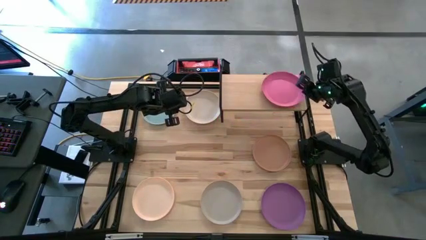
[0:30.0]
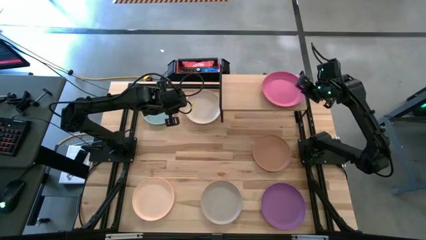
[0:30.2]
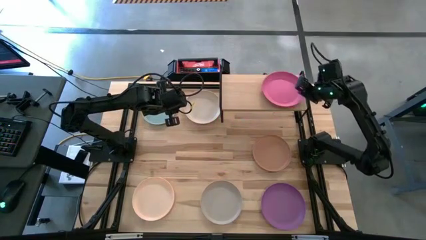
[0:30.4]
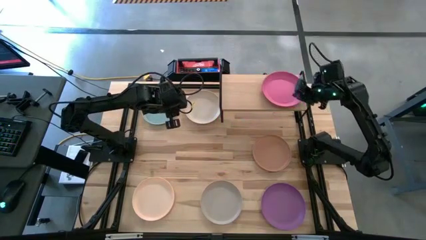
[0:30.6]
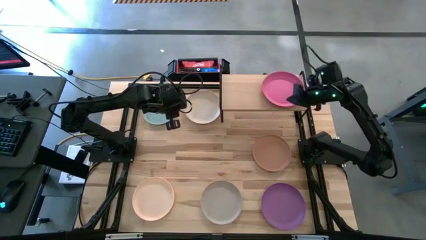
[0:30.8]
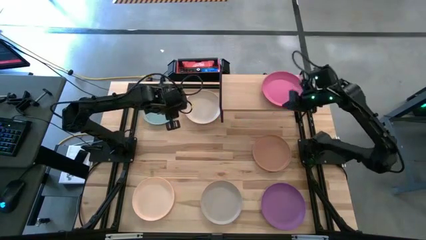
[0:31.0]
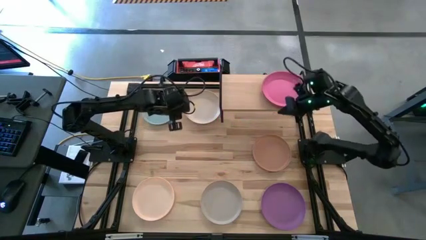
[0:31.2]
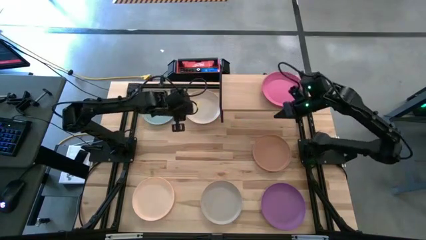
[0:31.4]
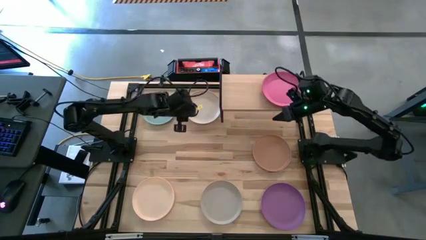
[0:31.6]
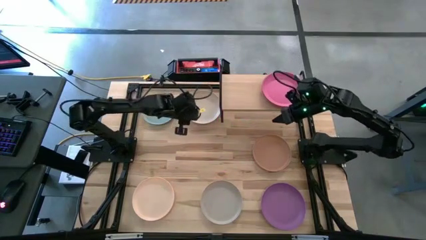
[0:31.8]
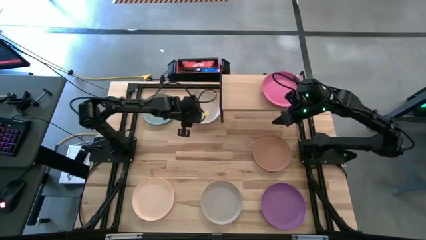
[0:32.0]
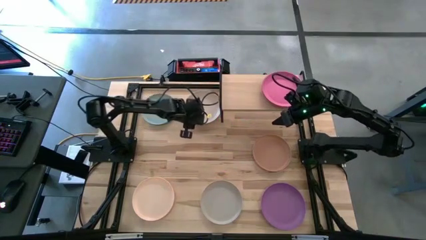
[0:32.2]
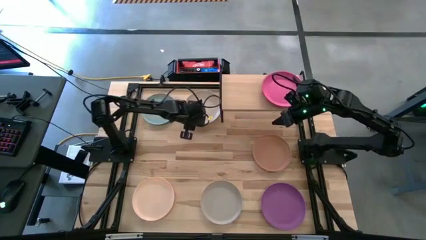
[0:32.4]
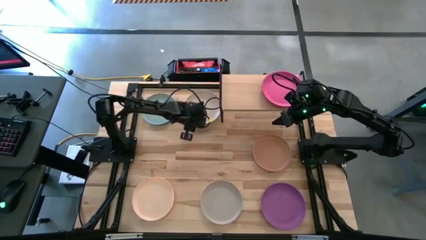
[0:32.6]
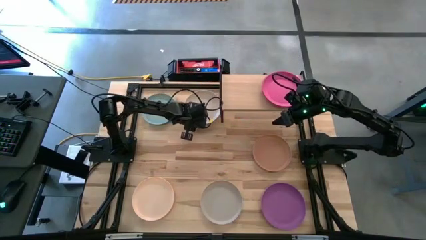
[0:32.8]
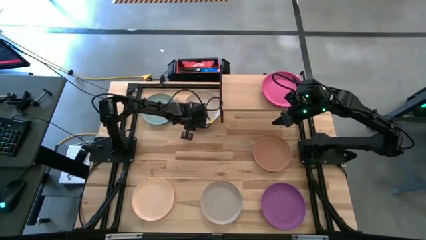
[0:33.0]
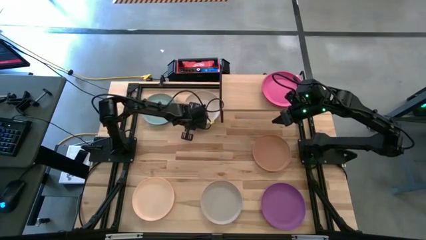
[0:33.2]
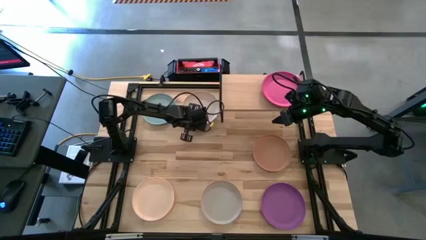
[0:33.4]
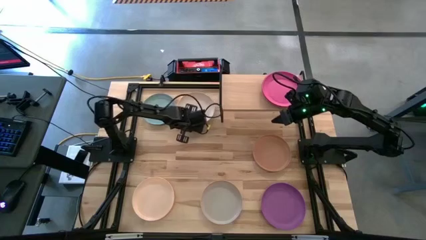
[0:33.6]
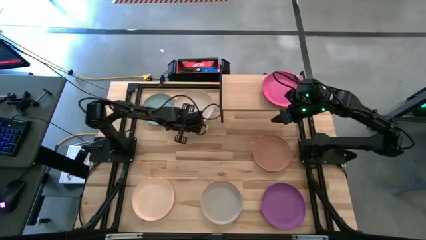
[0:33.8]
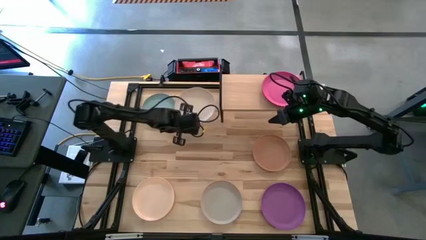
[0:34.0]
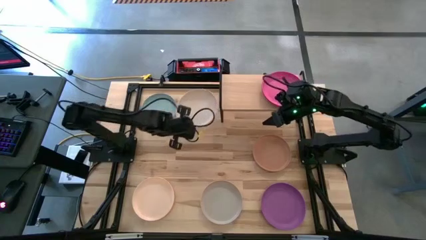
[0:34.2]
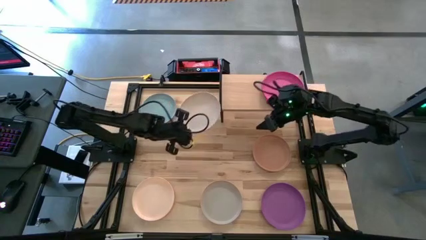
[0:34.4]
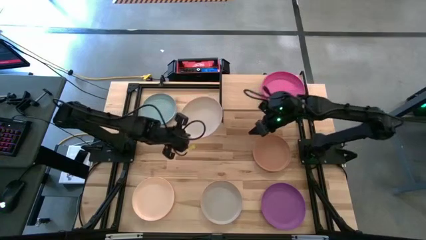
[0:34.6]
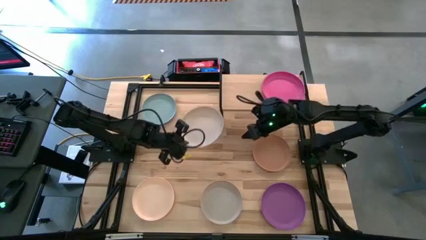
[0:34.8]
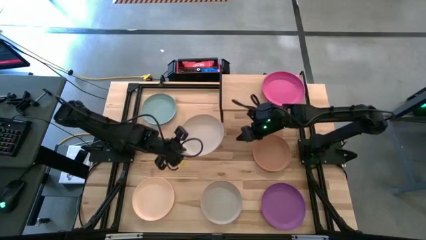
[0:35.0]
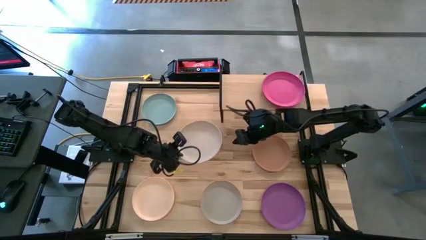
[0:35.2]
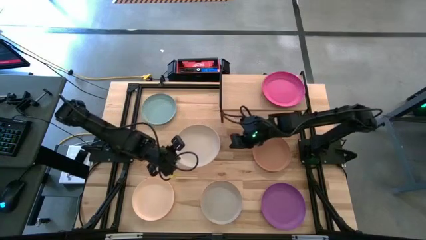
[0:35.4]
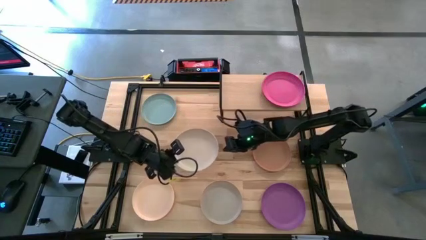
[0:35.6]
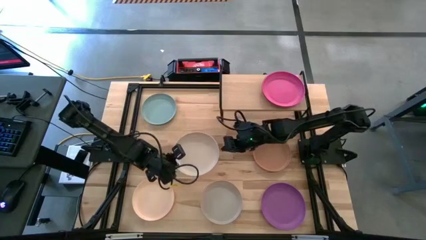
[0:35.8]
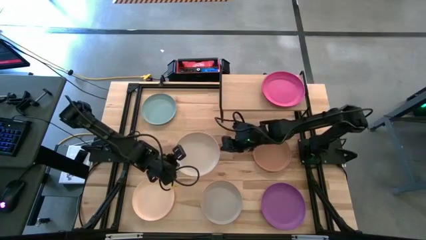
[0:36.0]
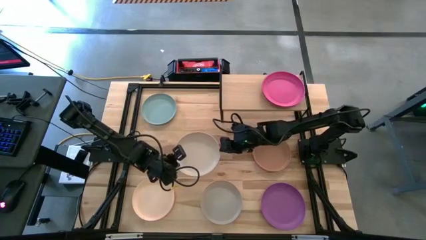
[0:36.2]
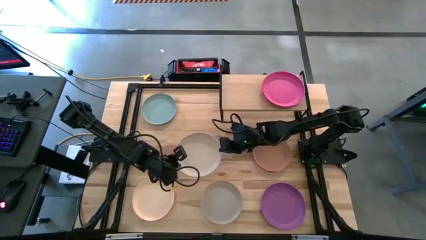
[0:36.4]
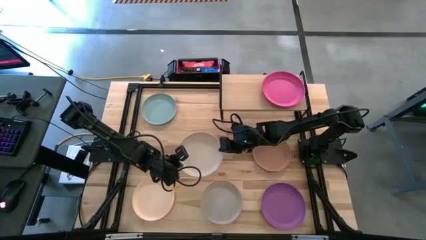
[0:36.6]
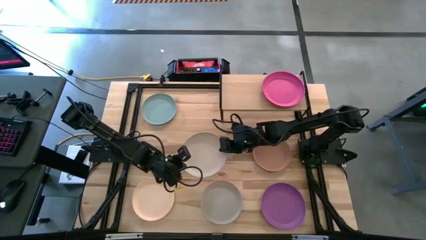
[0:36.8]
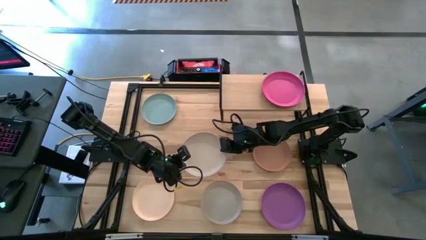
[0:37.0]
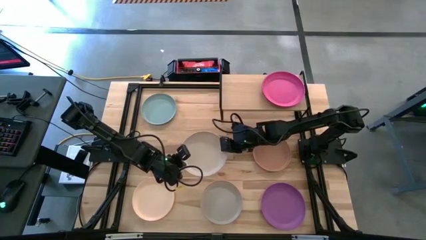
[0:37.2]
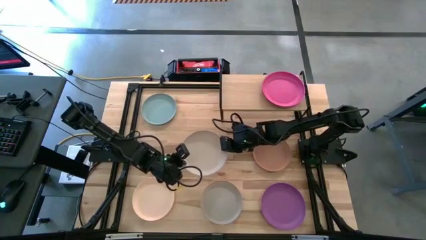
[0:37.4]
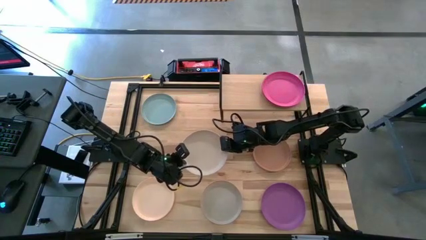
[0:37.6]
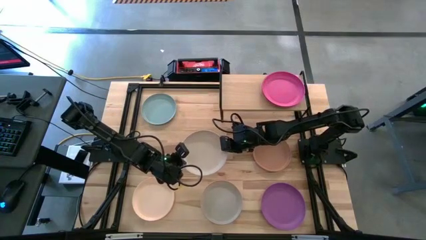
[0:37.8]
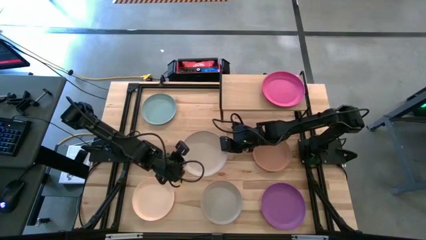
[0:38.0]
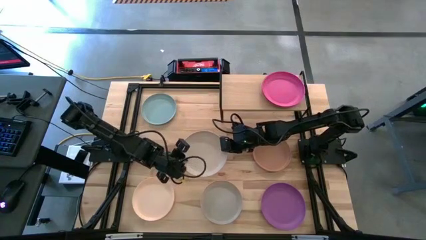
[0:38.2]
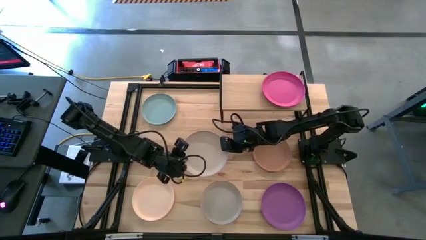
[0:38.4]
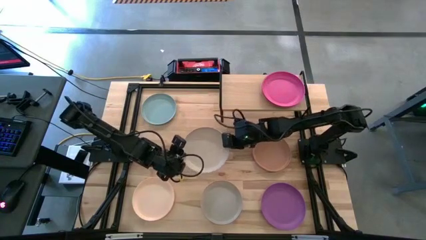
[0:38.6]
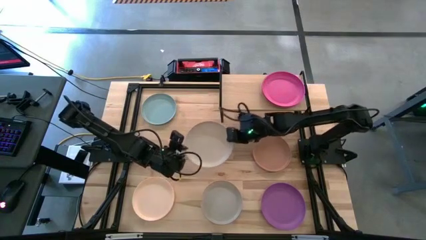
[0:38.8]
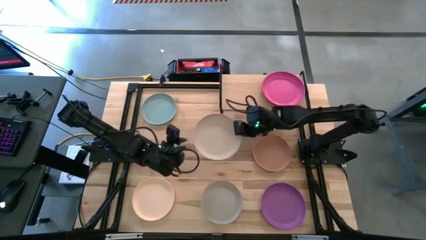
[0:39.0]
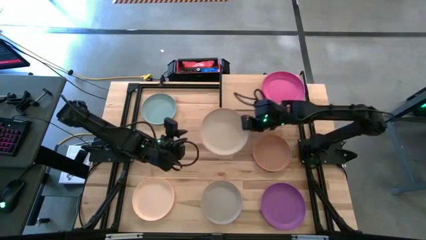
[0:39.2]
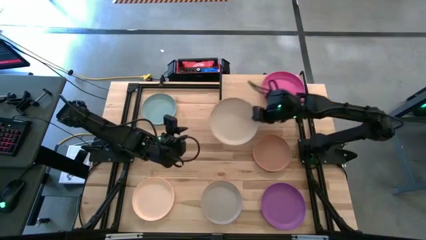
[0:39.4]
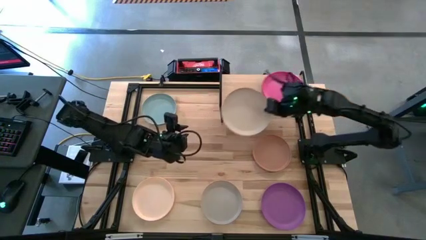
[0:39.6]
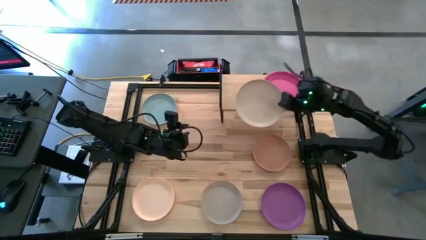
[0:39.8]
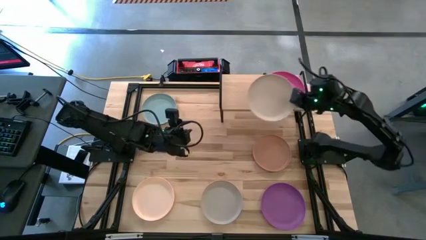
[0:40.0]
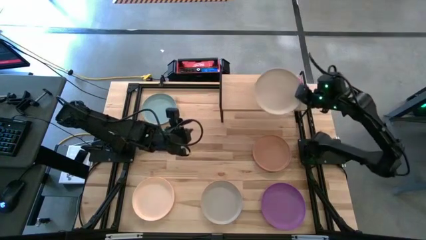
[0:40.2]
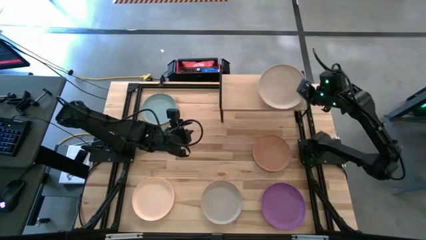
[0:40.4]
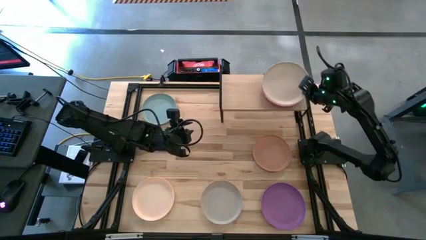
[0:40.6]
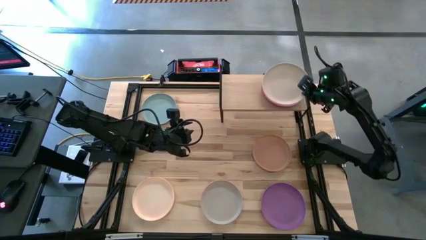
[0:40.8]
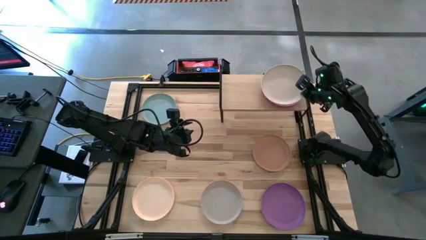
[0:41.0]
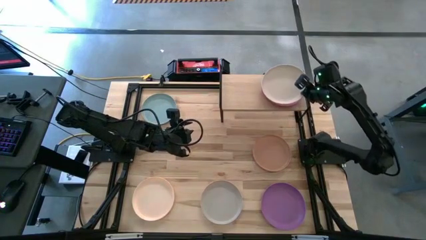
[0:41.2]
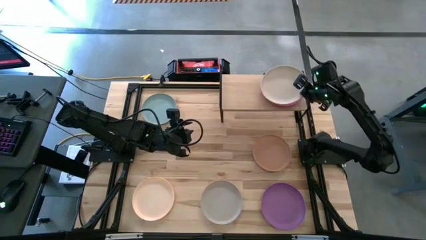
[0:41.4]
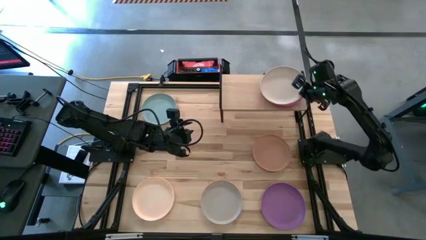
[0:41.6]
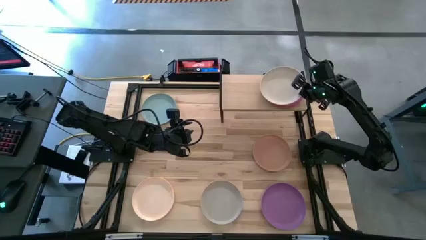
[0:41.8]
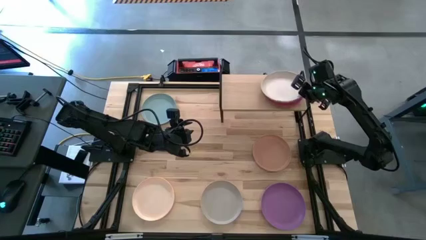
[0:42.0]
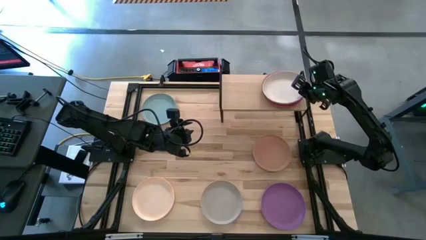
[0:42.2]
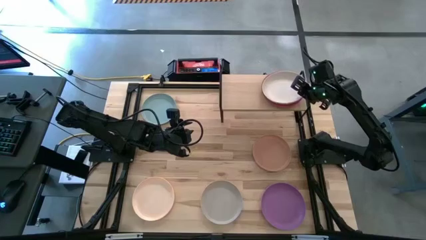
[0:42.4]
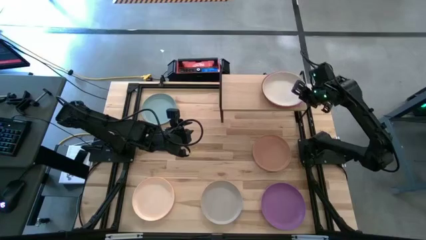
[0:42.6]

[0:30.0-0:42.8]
Task: Place and stack plates onto a shelf
Stack the white plate on top of the pink plate on the shelf
